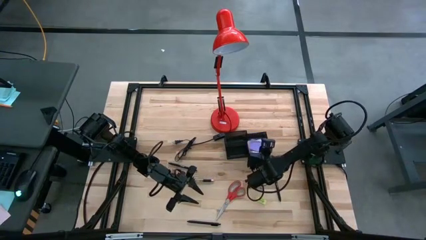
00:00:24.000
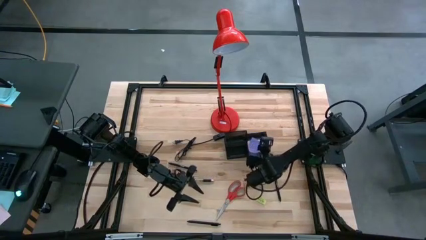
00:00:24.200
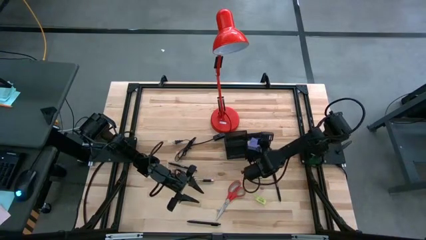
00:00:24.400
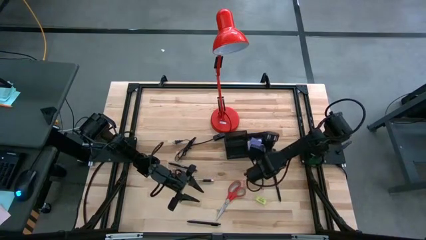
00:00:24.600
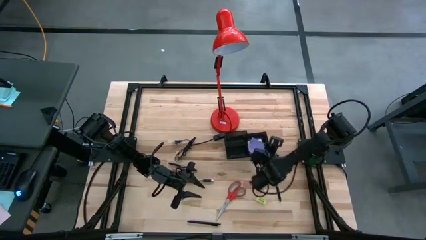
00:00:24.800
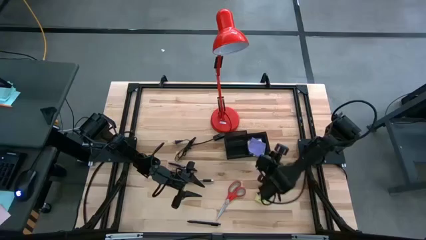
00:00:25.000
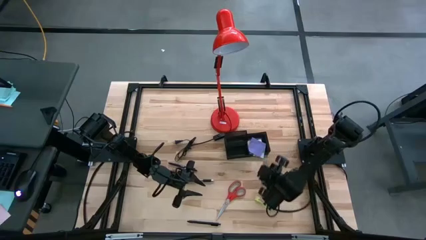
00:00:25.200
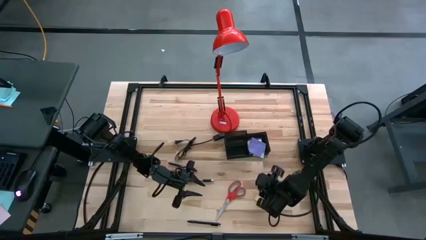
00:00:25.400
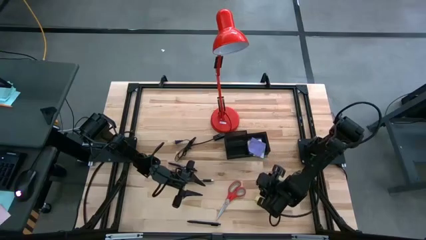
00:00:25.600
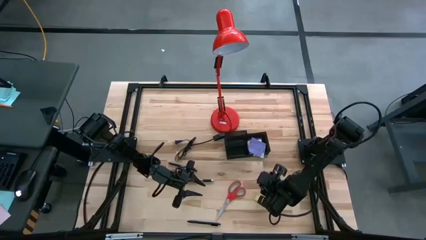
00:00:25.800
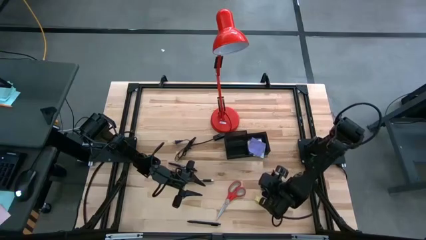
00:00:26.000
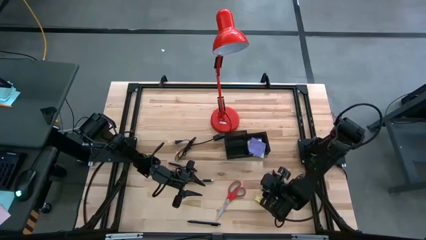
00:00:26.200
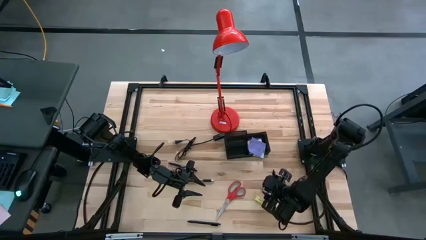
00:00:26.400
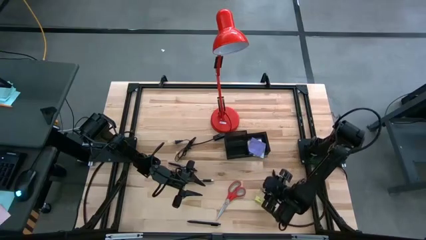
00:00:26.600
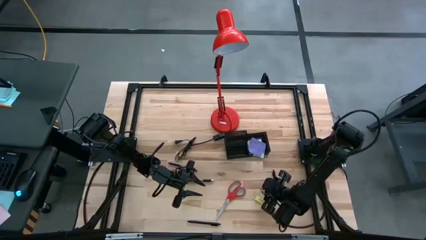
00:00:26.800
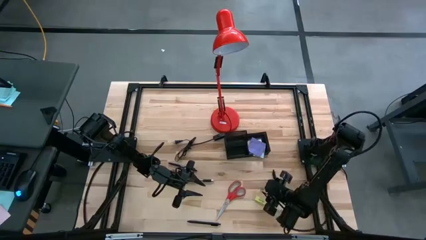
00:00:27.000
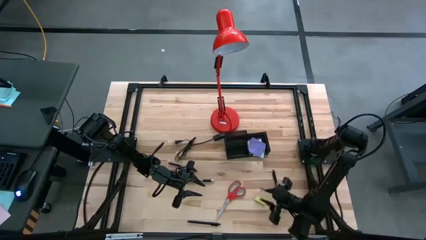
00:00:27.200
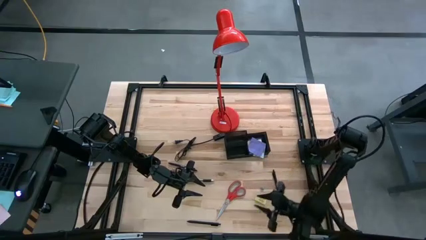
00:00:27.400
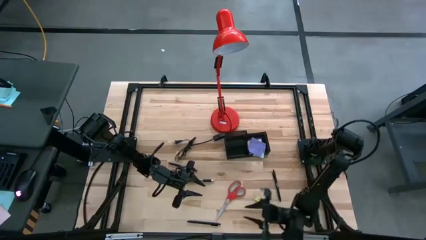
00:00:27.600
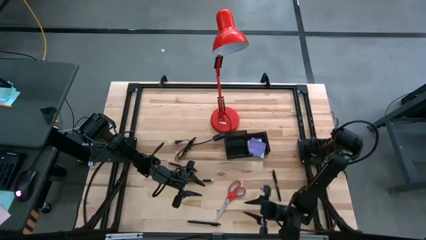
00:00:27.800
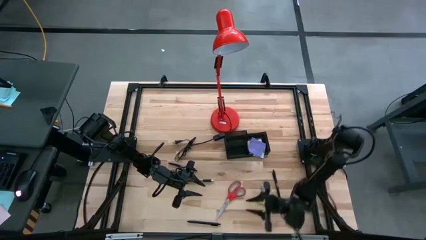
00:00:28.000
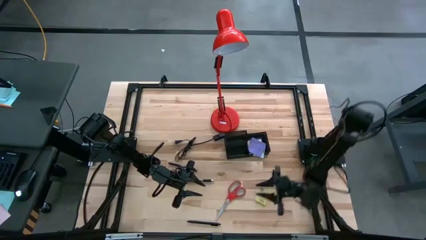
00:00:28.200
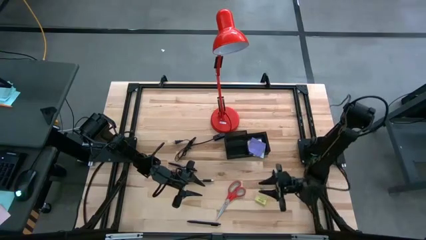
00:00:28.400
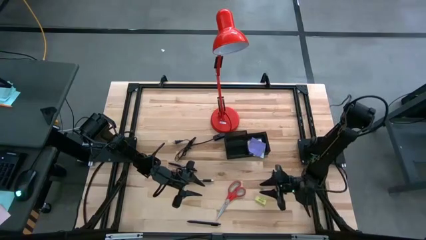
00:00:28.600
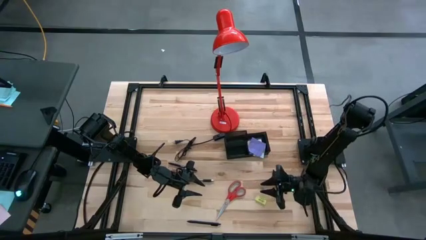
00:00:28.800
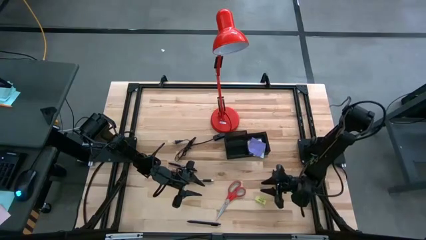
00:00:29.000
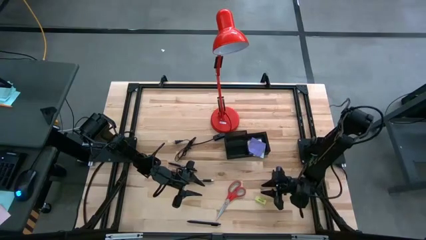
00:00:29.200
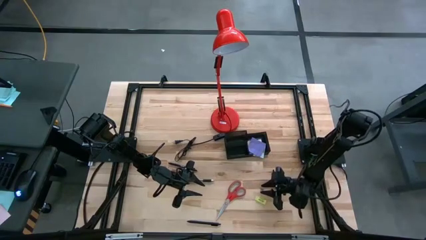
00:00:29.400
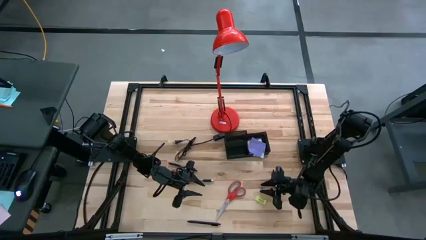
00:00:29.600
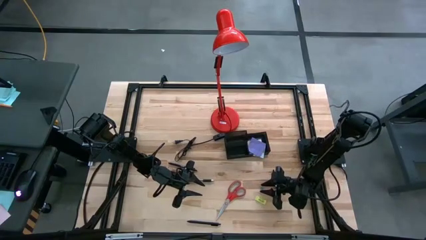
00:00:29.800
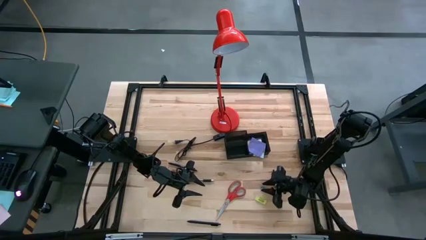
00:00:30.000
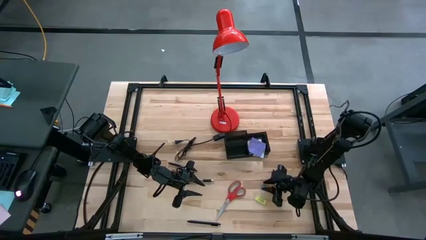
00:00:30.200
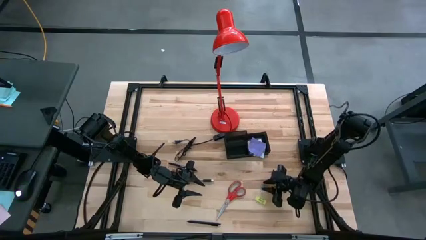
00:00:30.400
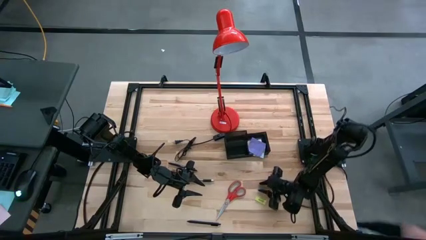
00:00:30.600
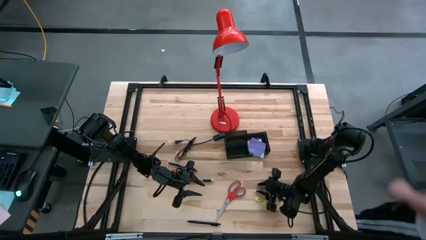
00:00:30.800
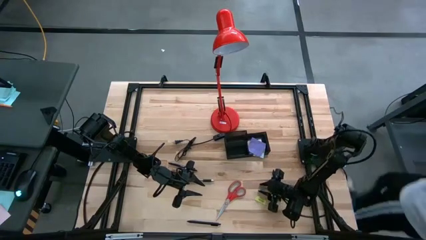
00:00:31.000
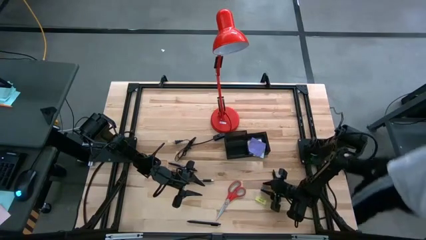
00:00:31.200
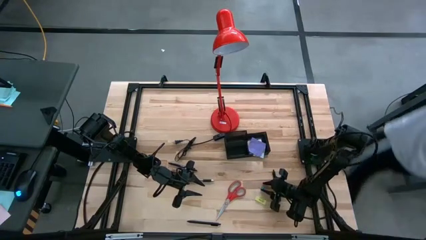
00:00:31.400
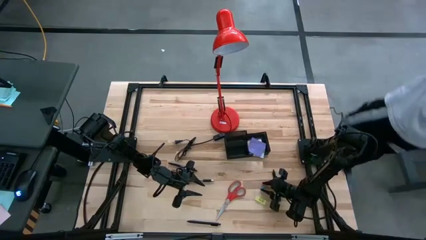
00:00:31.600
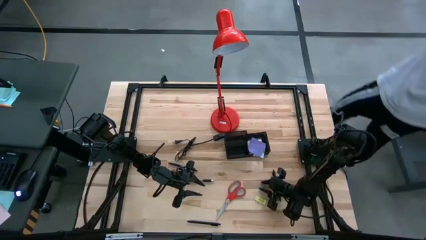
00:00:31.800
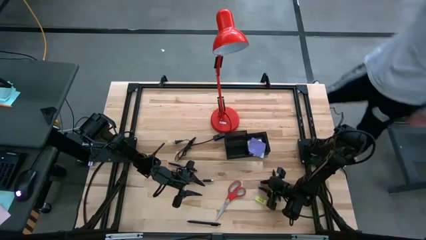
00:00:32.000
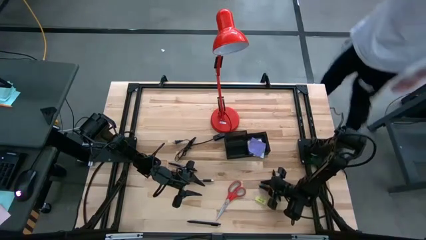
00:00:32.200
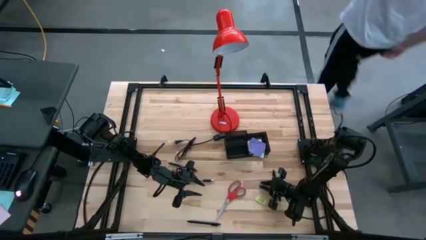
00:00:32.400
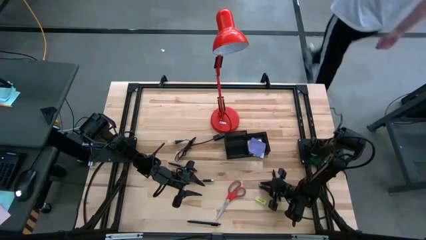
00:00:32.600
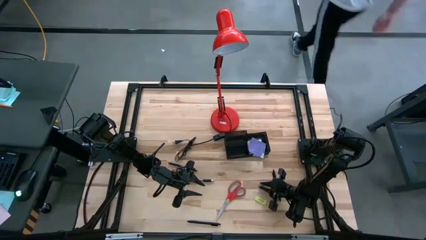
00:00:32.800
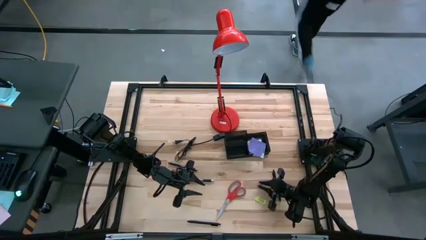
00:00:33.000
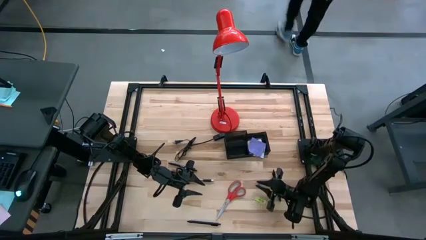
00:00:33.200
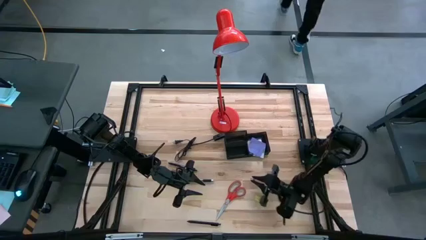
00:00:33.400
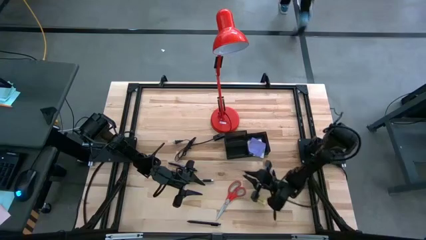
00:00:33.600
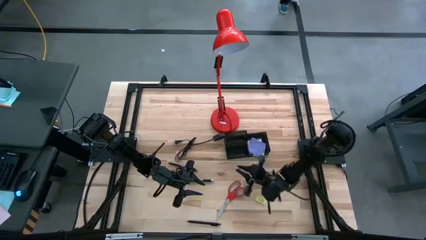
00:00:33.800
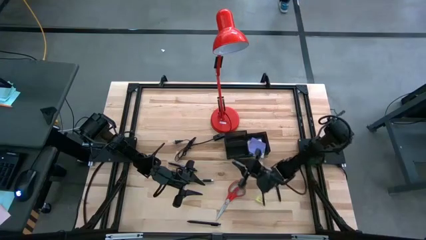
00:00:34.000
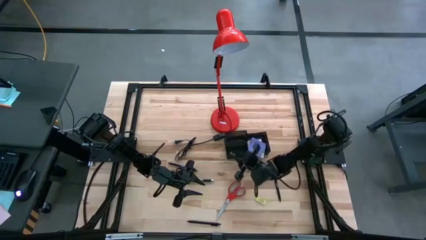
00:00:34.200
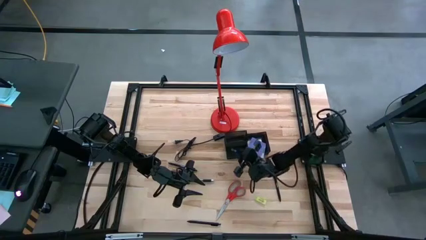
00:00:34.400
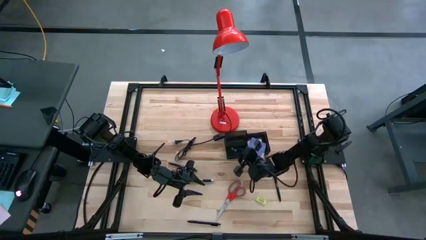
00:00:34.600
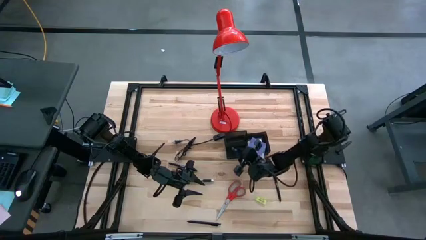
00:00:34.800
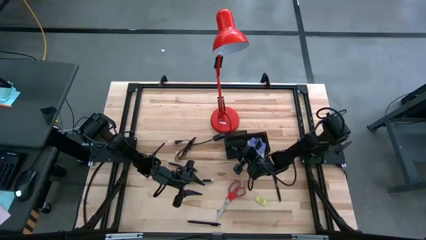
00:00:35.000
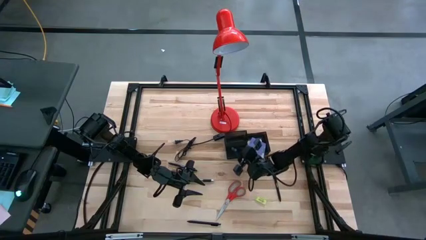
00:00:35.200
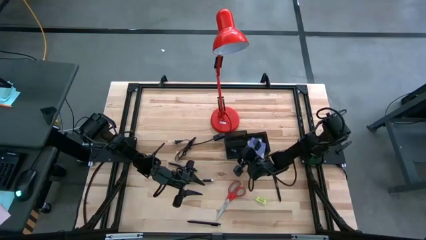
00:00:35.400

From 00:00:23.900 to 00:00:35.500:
Task: Pick and place office supplies into organizer
Put the blue binder clip into the desk organizer
